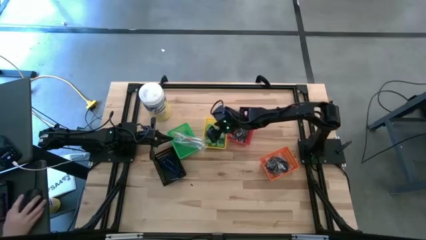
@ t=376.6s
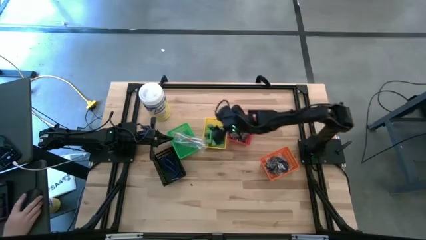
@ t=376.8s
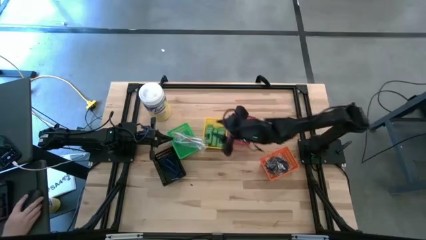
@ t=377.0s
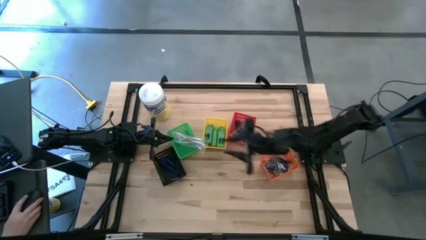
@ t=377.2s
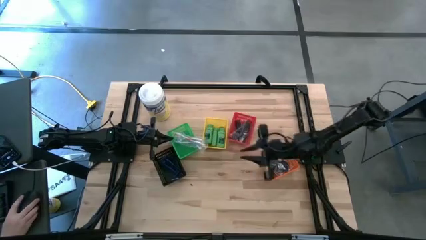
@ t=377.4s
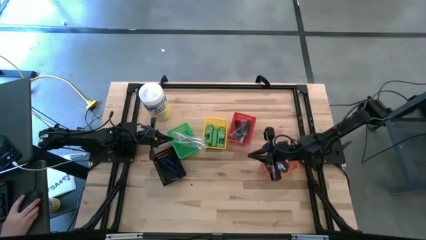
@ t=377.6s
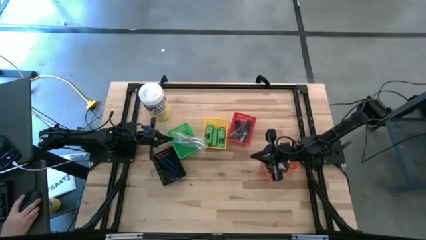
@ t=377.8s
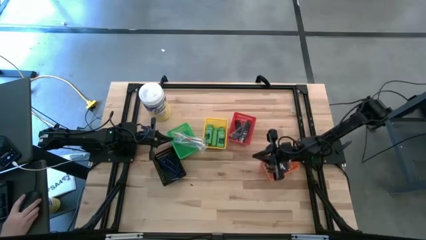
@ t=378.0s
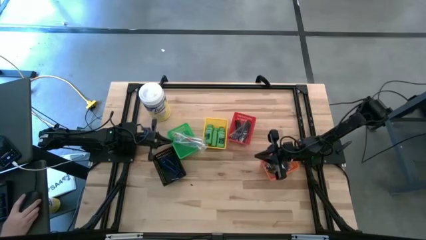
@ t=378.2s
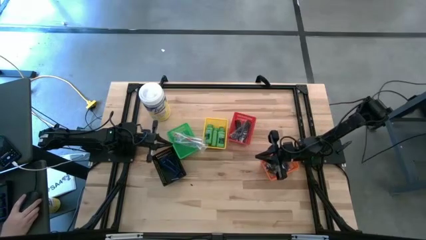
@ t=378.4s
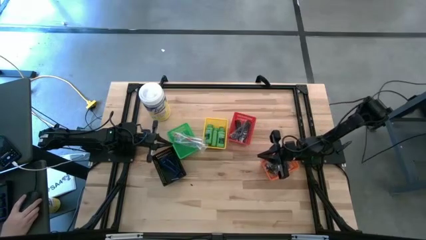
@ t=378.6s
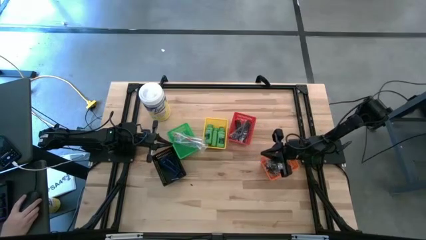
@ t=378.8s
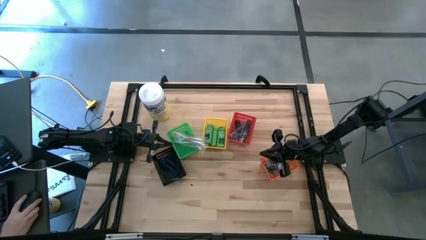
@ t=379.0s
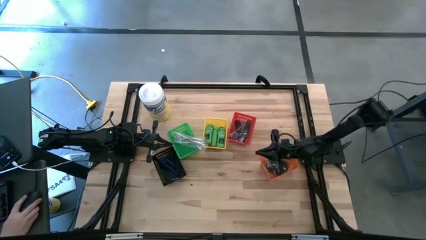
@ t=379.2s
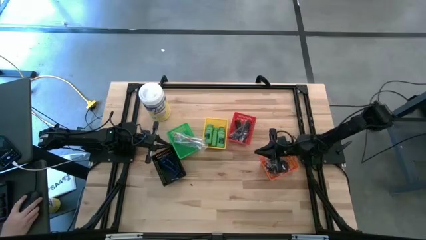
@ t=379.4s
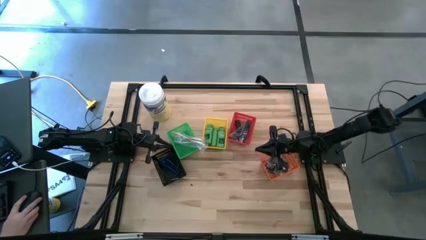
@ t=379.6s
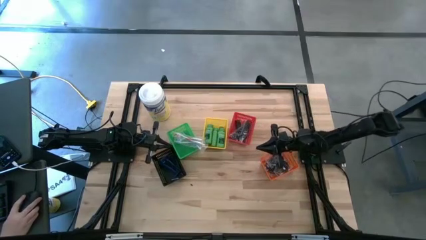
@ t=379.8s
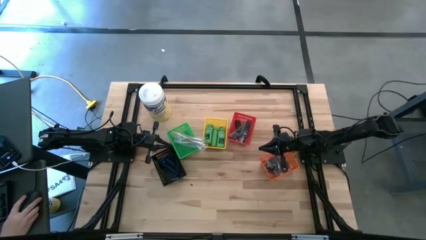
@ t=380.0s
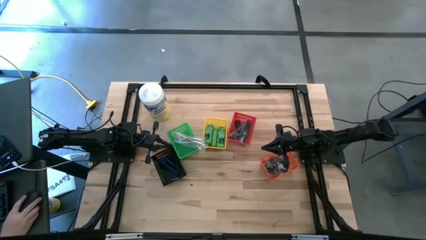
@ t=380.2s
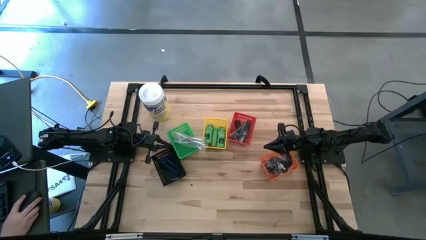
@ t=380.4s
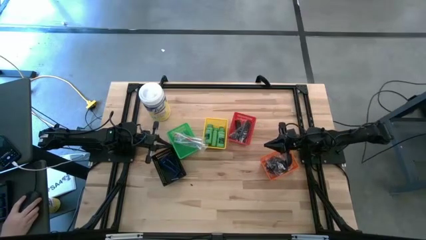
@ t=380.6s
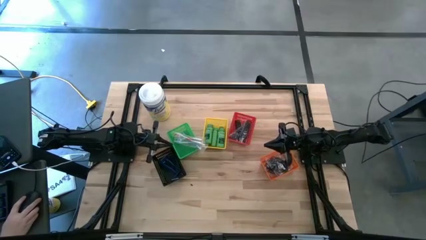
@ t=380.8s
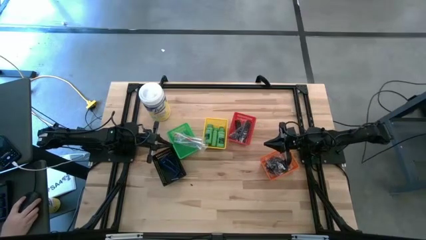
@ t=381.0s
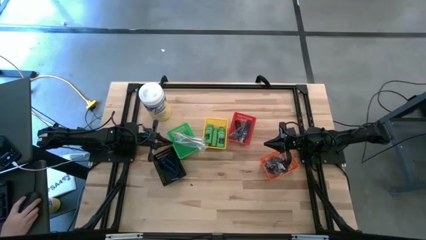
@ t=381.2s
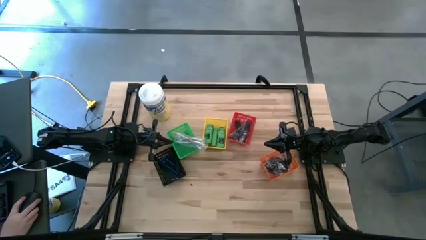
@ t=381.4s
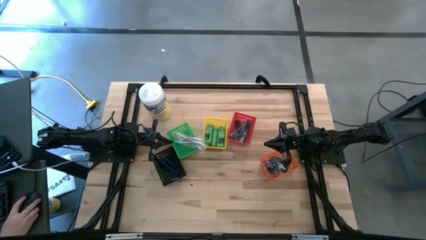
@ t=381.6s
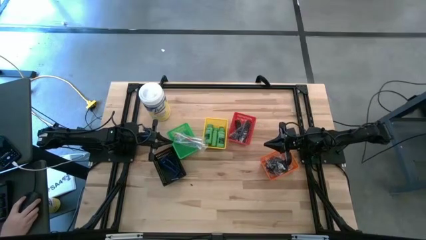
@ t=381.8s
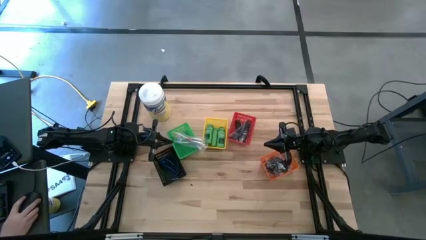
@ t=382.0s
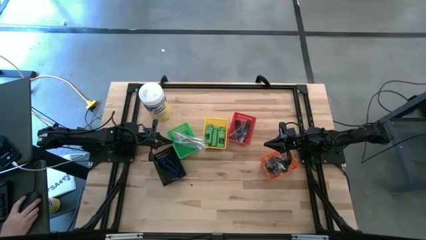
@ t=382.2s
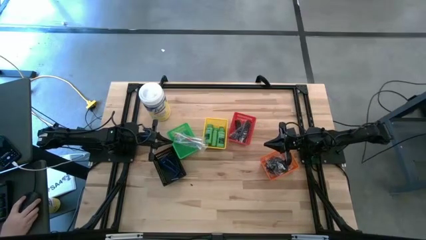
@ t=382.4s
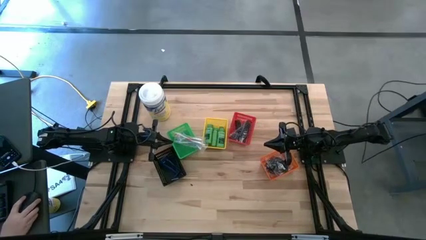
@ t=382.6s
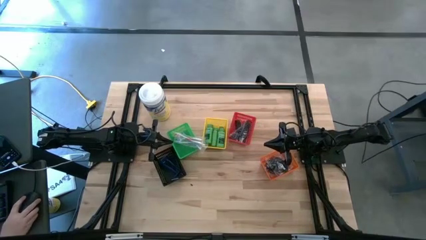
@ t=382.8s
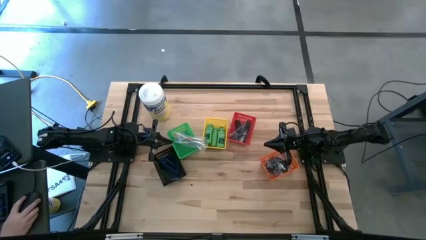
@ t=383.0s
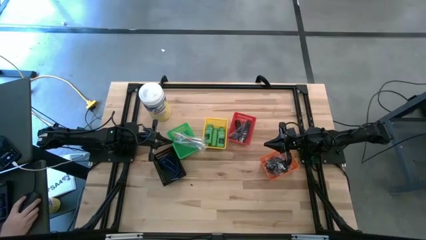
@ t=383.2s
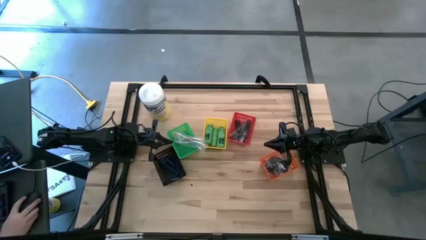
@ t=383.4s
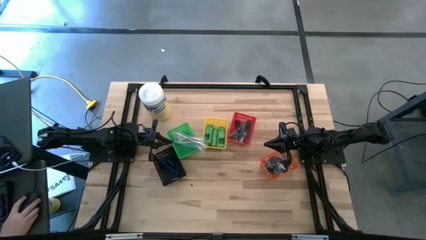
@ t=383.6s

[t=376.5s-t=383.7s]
Task: Pick & Place Travel size toiletries
Return to Home Position

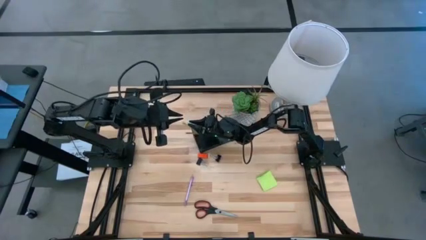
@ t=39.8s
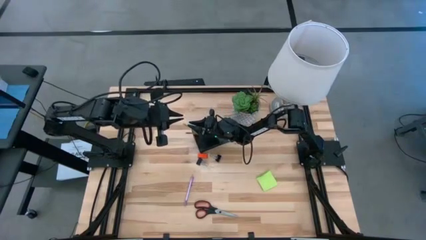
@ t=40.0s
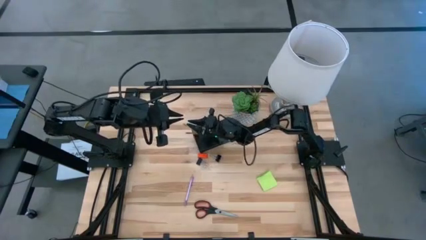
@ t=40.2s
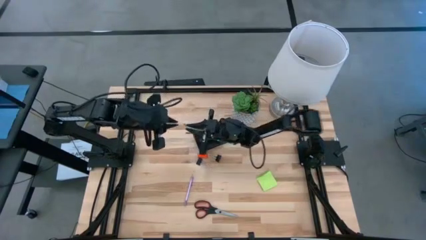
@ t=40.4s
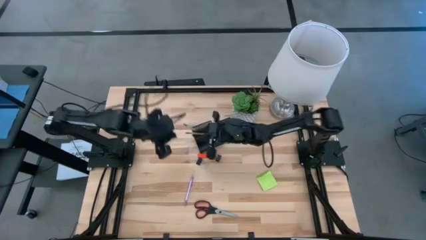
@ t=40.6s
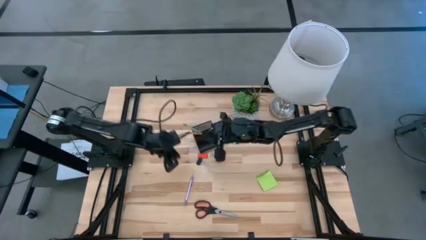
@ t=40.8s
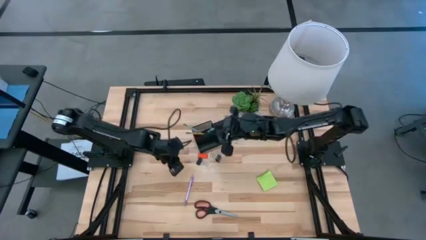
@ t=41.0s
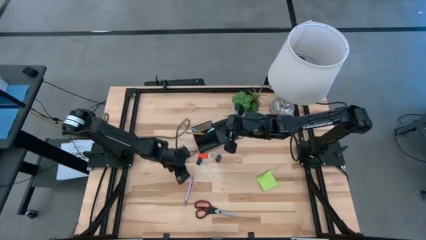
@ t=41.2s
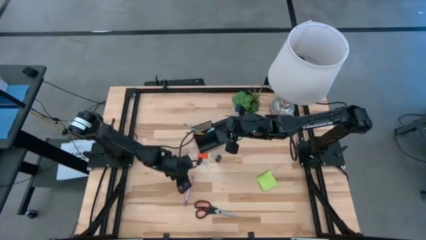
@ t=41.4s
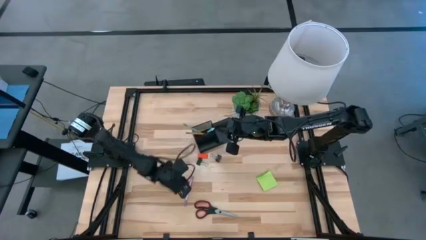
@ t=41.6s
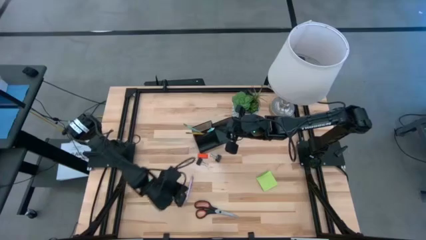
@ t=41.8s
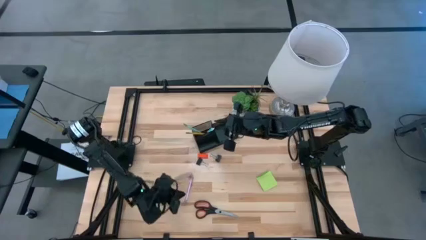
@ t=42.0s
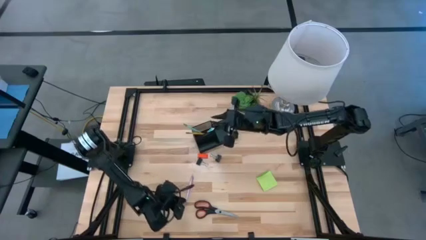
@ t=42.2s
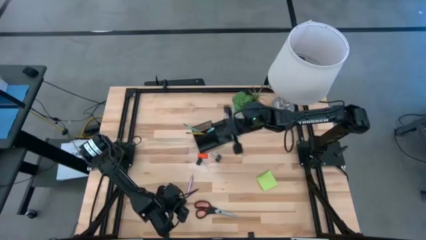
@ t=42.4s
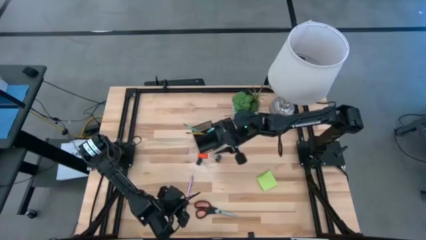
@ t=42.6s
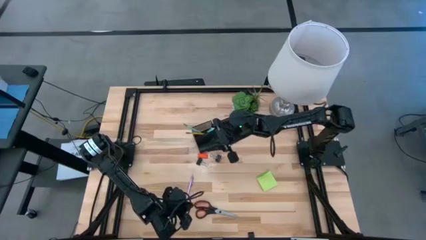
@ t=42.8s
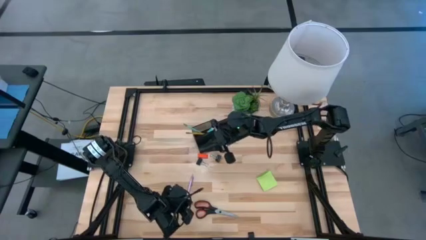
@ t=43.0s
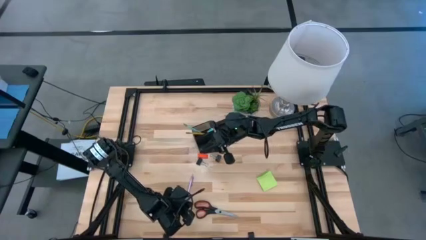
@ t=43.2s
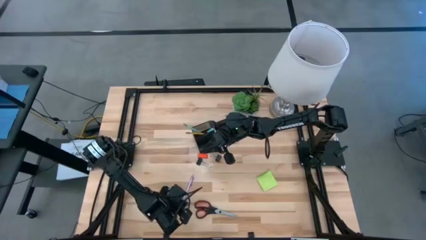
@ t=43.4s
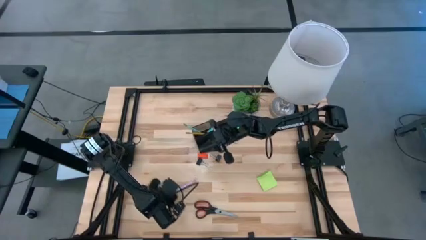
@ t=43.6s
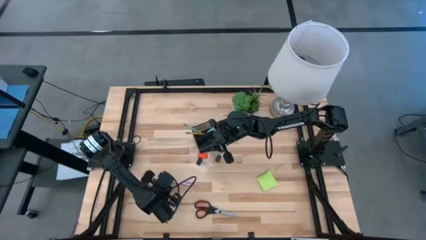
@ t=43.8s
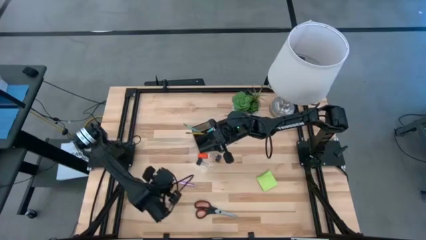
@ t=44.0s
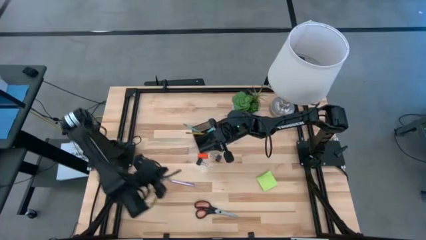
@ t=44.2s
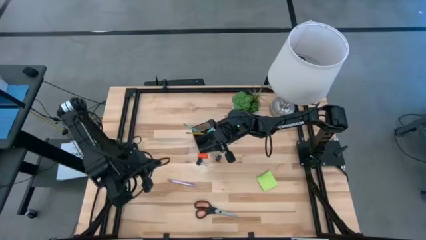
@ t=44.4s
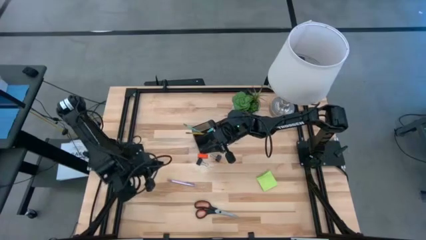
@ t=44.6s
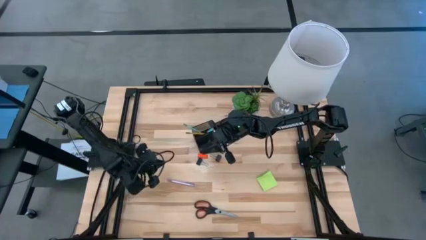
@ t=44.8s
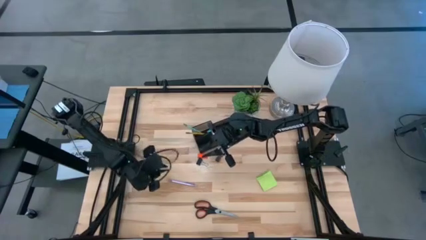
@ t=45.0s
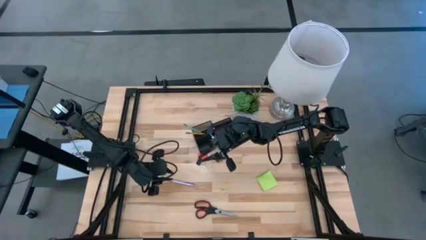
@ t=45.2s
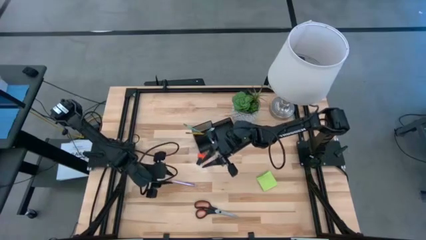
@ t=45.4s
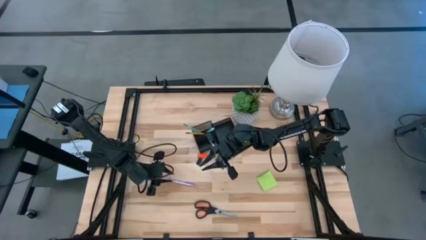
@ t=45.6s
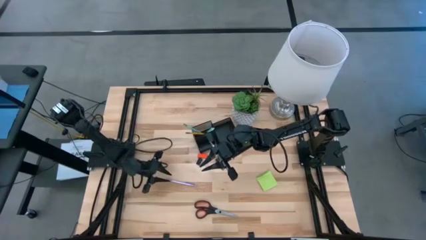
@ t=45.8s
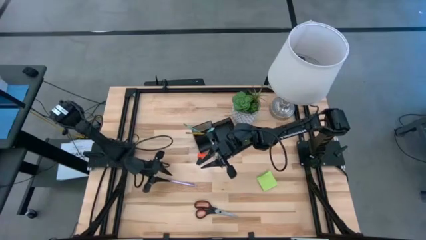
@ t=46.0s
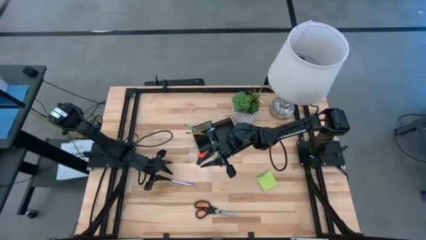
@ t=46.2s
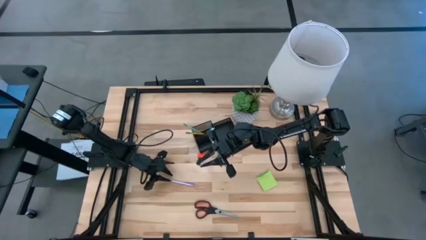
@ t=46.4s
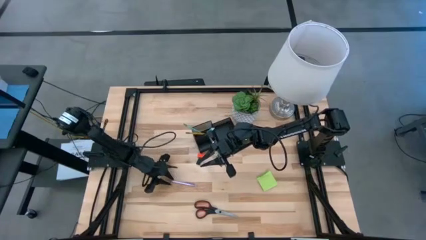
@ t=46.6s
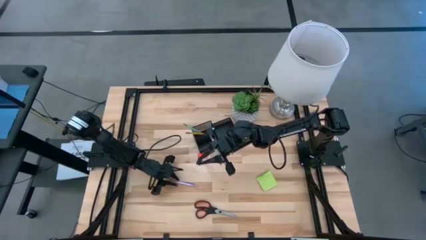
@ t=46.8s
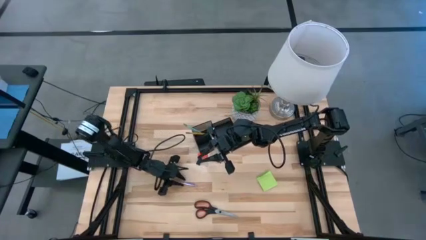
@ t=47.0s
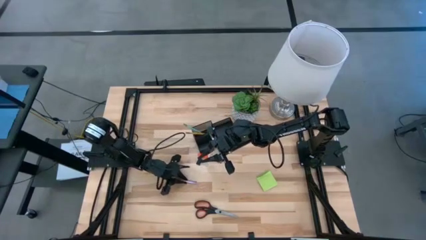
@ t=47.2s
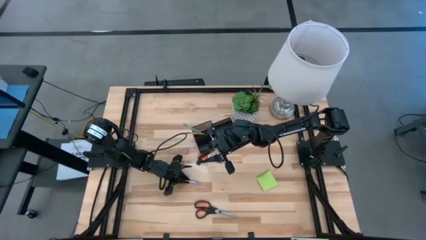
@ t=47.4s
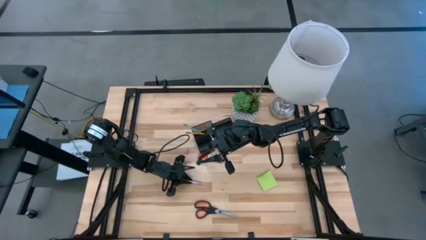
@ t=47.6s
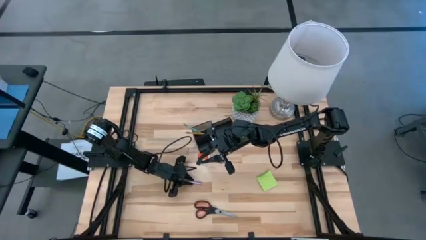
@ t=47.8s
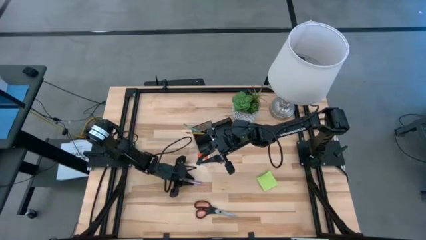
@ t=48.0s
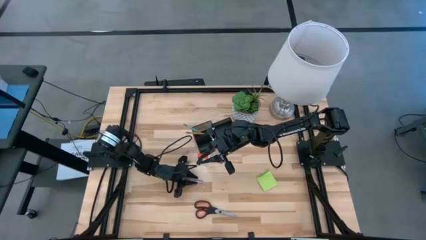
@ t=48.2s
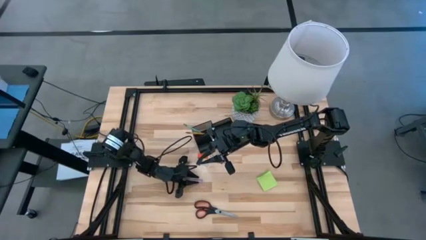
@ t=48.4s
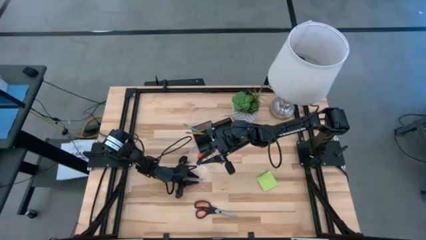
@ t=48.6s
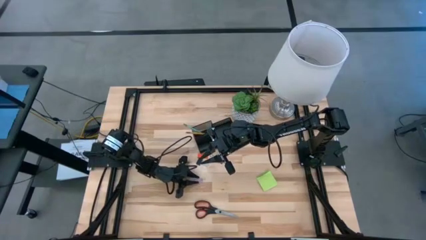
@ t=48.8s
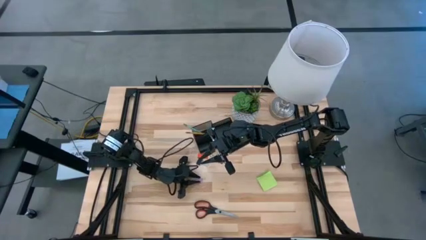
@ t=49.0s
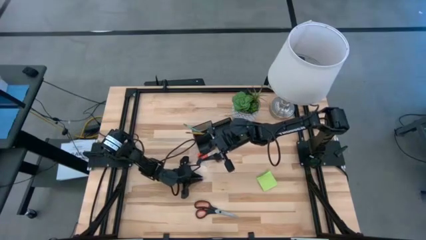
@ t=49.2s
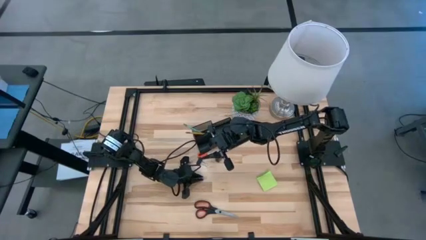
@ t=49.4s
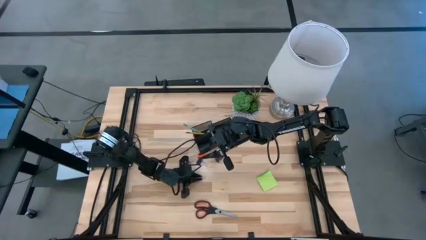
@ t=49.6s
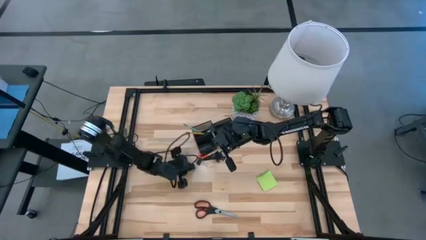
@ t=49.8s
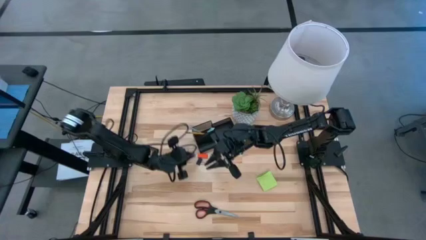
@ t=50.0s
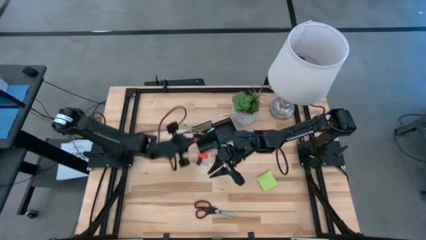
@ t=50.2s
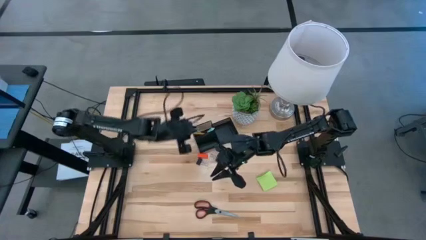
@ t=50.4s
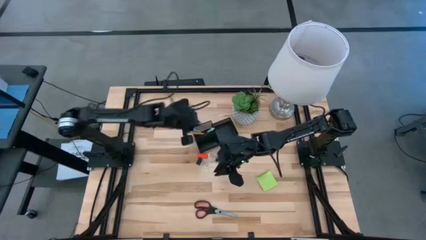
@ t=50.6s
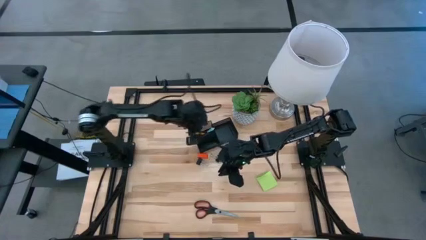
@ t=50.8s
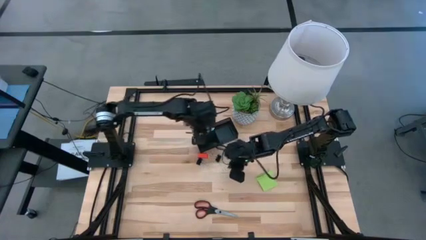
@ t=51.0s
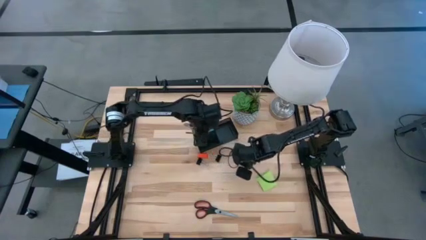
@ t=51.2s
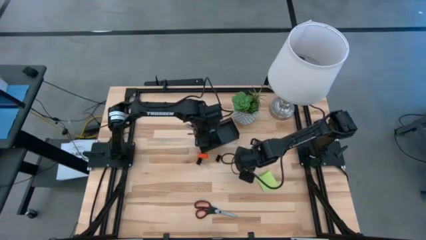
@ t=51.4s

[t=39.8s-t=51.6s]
Task: Pick and place office supplies into organizer
Put the light purple pen into the black desk organizer
